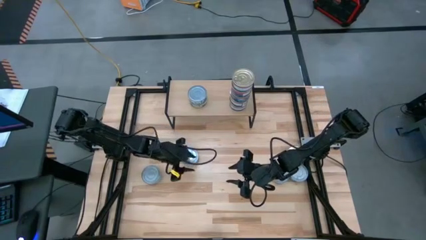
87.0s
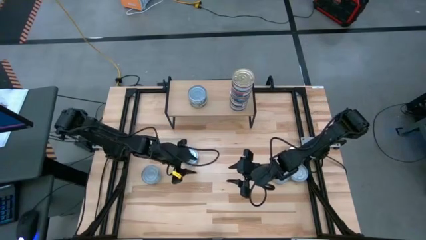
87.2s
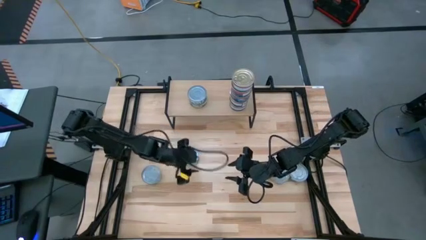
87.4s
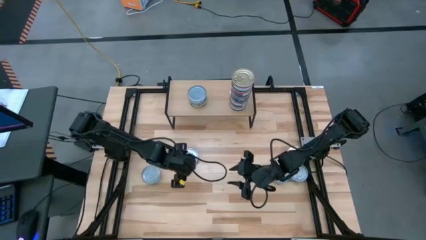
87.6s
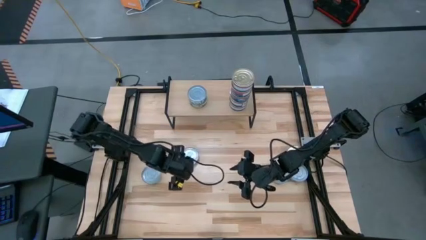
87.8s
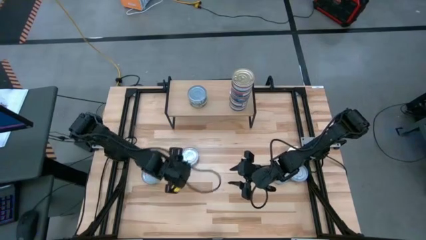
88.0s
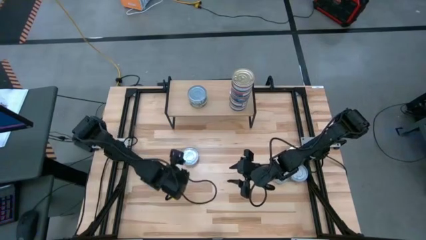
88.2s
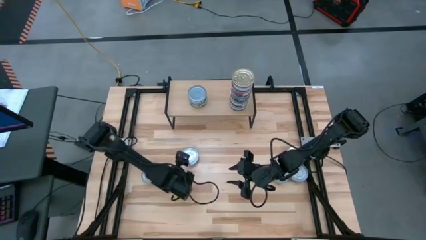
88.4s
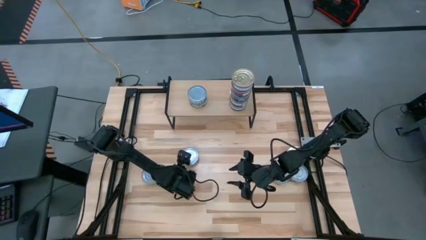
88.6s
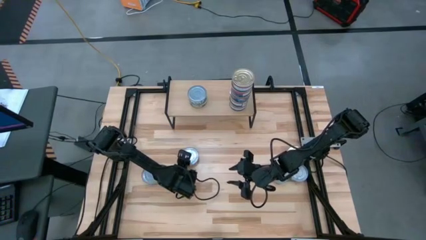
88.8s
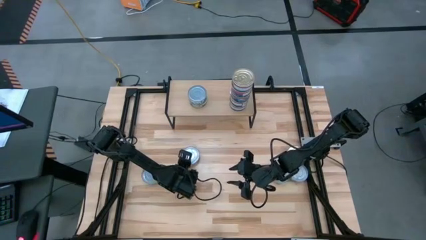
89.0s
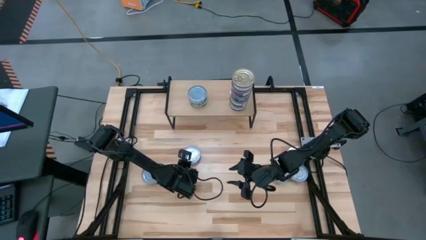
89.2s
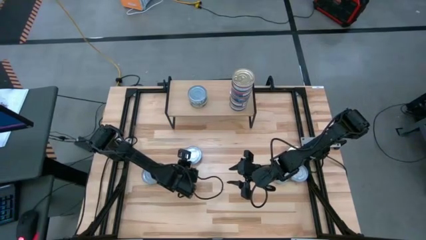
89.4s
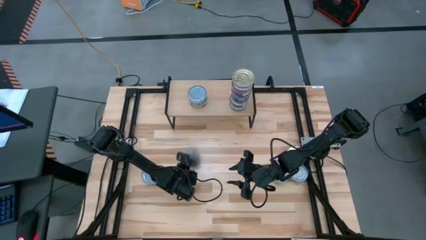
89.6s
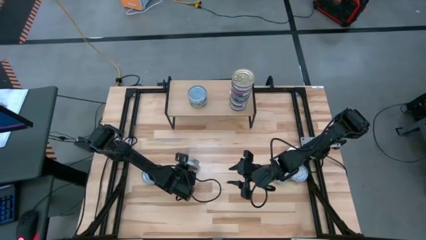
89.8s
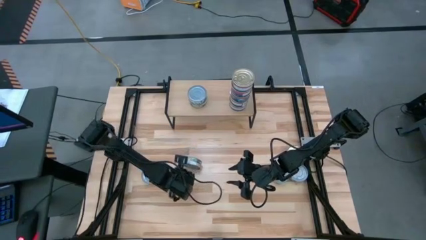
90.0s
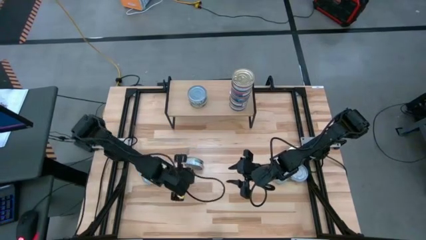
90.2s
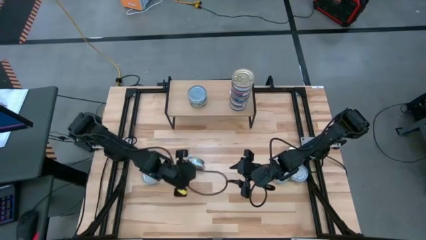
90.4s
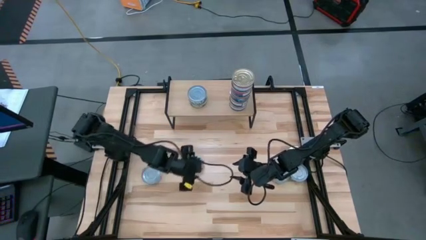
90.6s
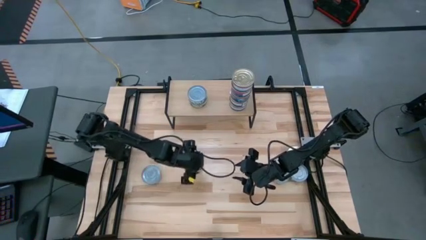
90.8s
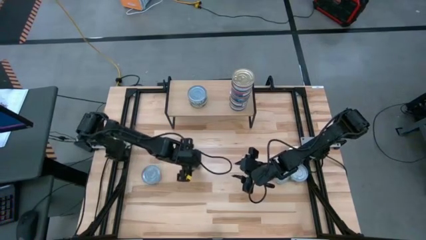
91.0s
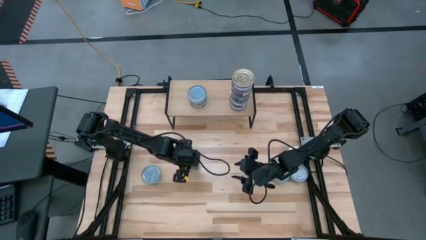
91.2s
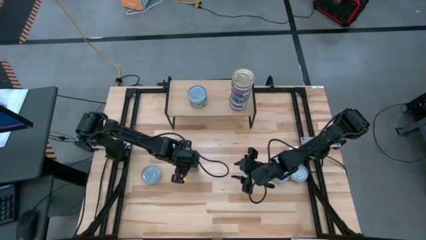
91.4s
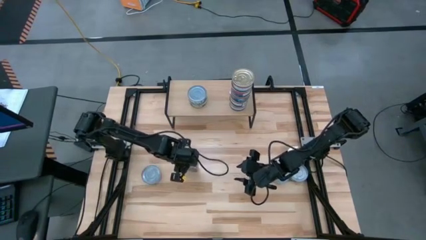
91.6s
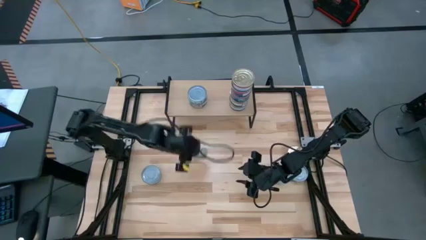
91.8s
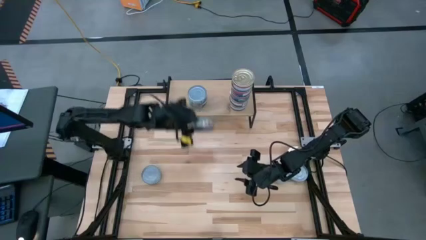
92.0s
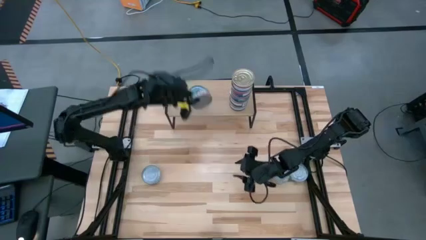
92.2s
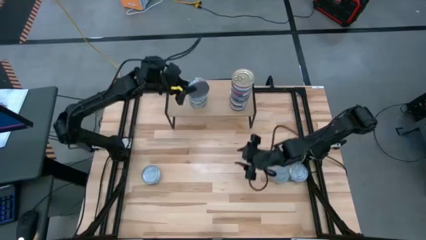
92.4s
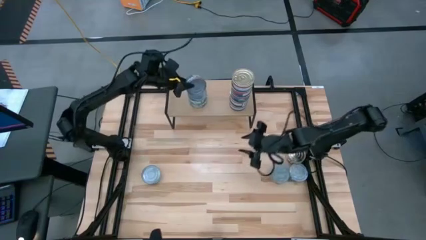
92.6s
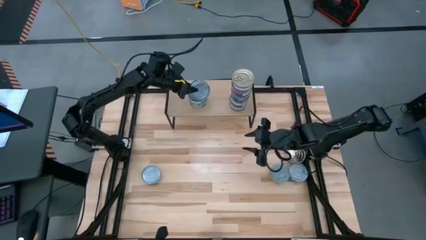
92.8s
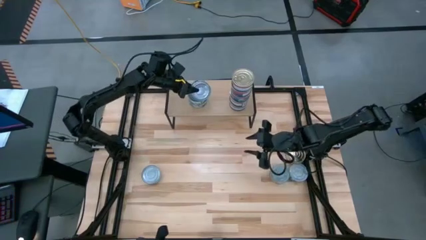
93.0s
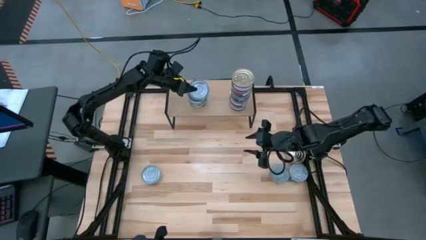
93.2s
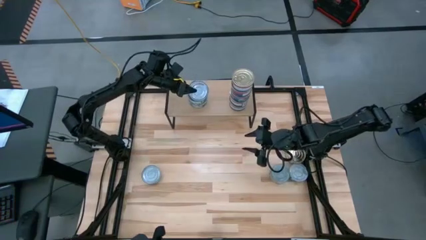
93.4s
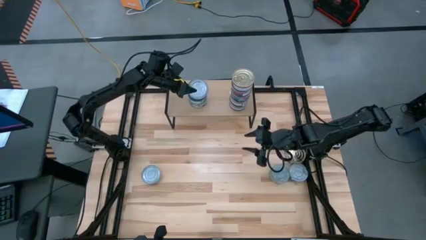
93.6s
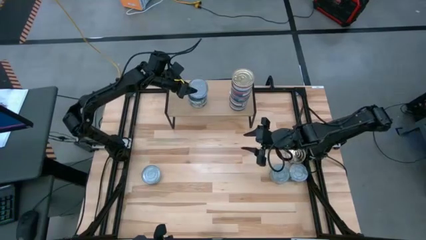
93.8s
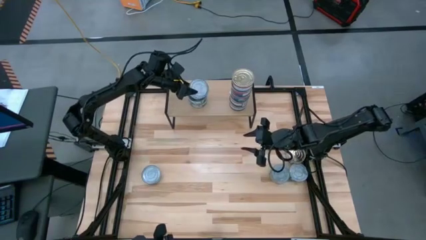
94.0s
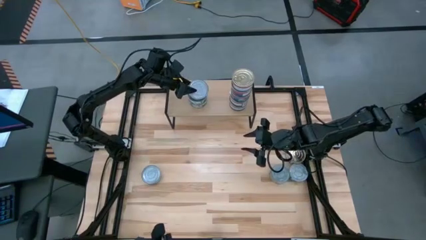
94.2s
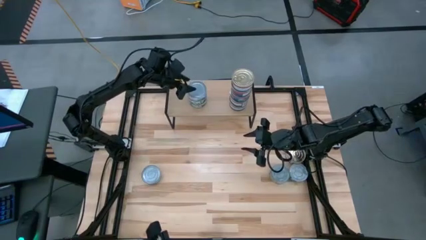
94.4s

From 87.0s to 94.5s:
Task: Stack canned seafood by type on shelf
Stack the green tuna can on top of the green tuna can on the shelf

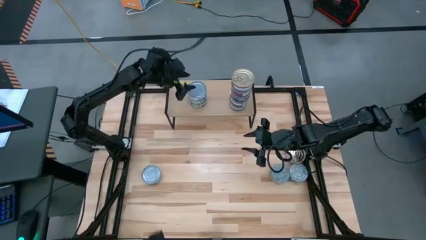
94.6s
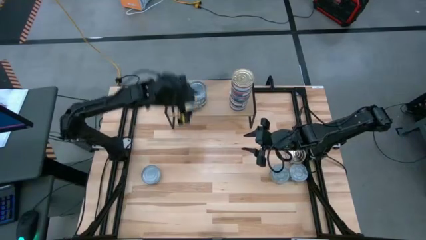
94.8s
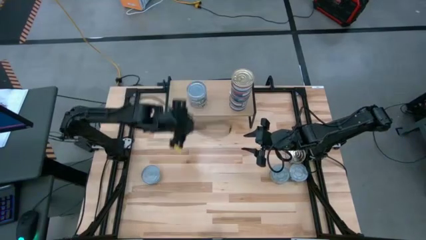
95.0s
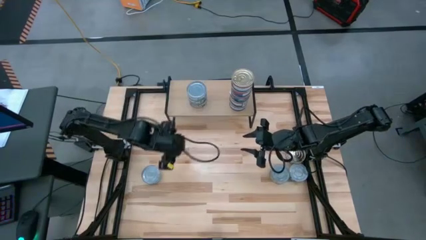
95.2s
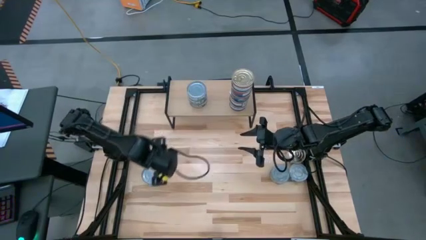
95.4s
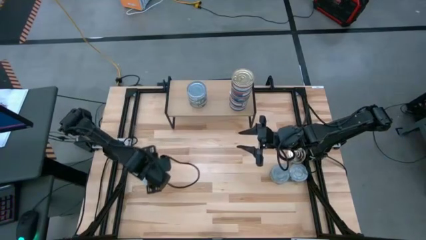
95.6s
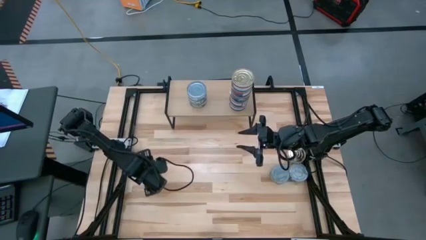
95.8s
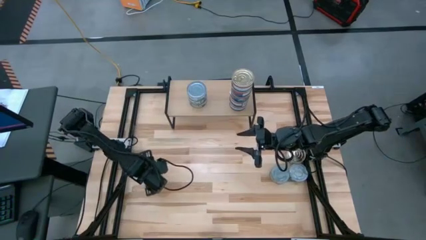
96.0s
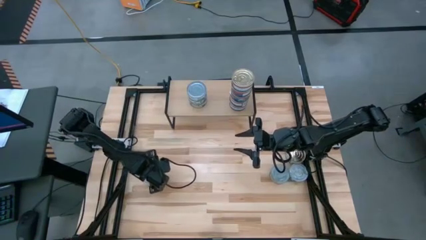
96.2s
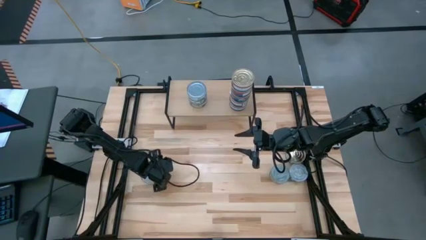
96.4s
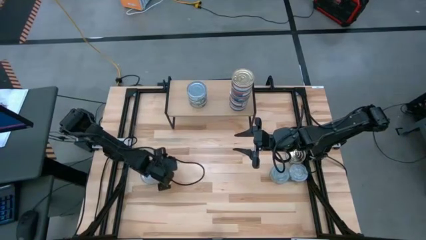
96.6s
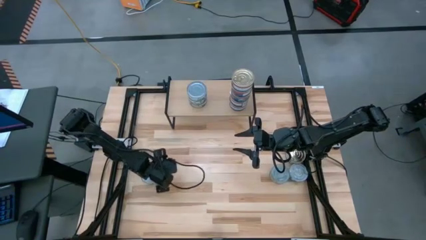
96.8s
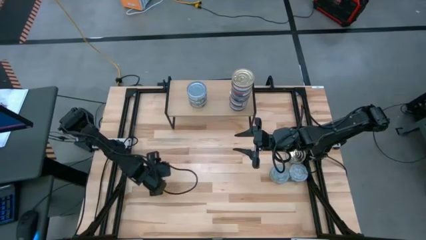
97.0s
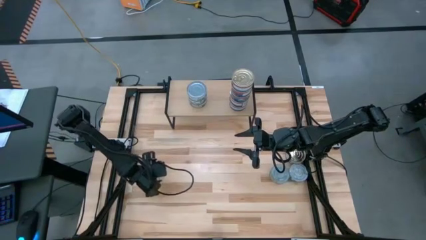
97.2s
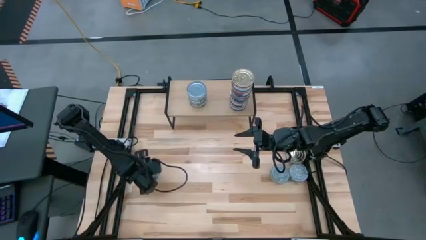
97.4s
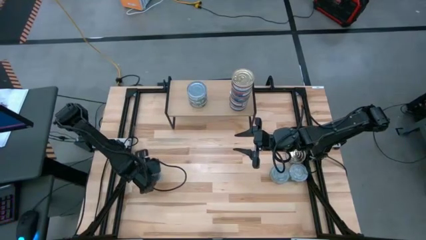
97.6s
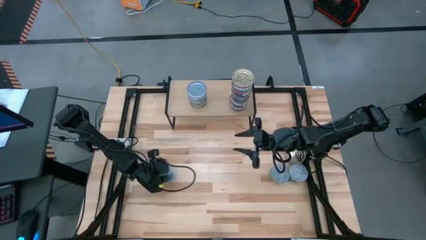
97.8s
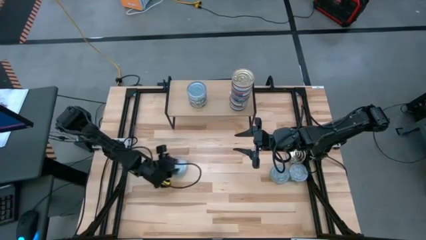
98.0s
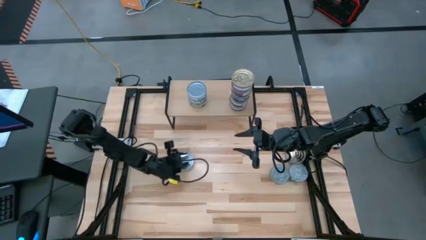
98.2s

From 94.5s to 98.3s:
Move the green tuna can to the center of the table

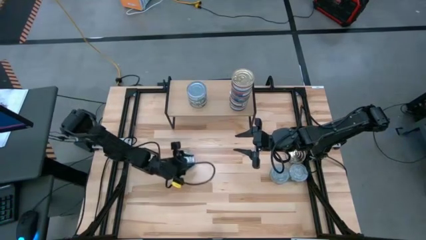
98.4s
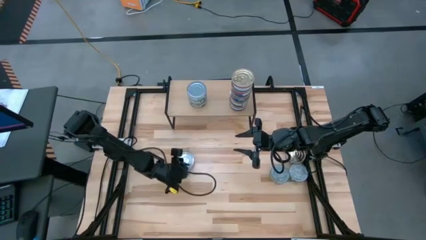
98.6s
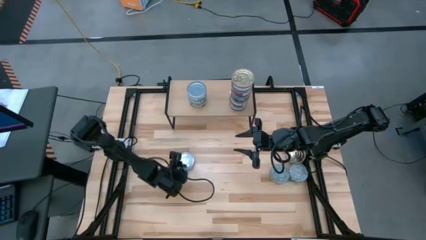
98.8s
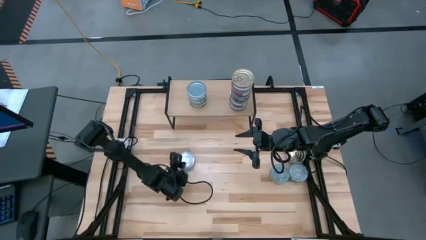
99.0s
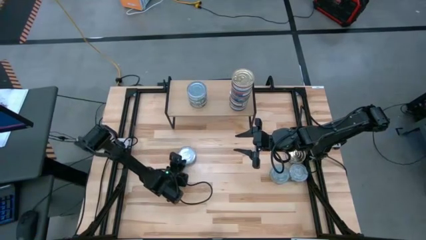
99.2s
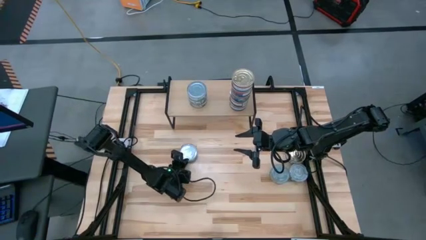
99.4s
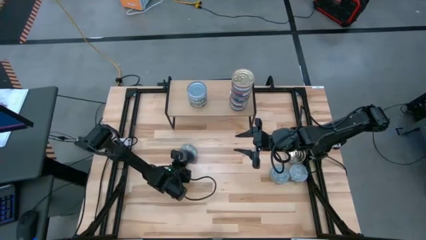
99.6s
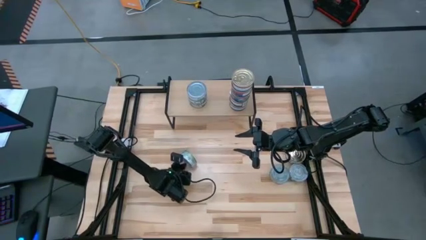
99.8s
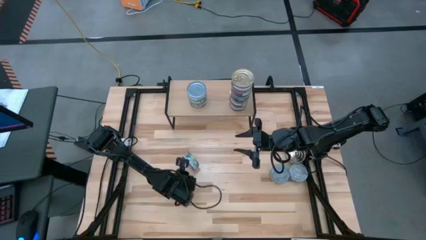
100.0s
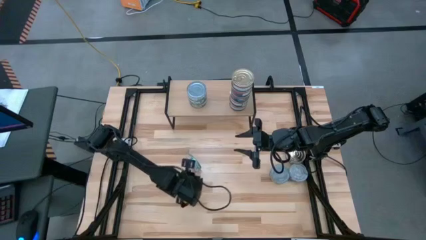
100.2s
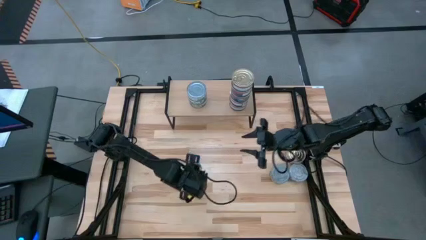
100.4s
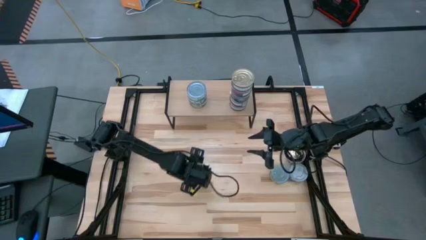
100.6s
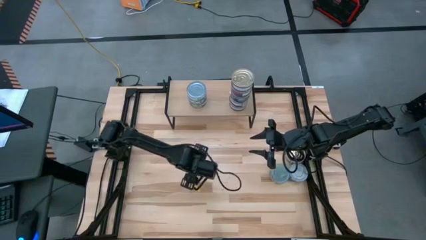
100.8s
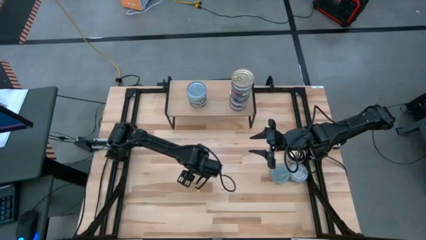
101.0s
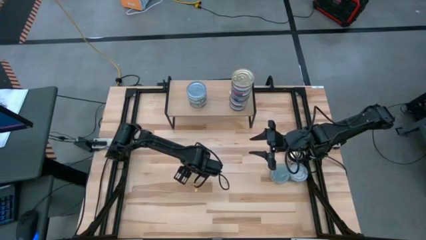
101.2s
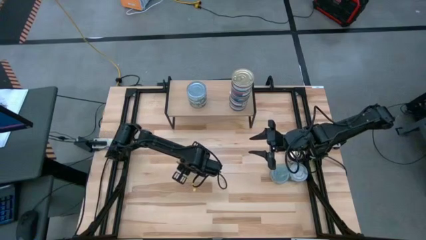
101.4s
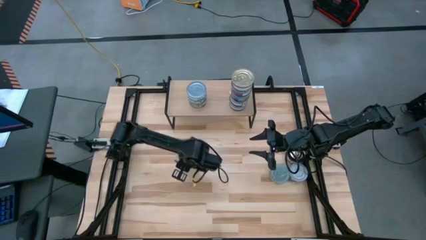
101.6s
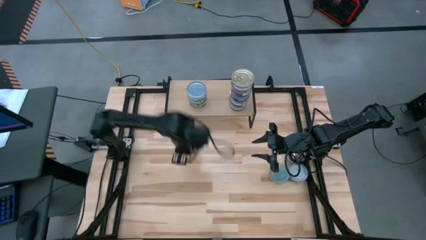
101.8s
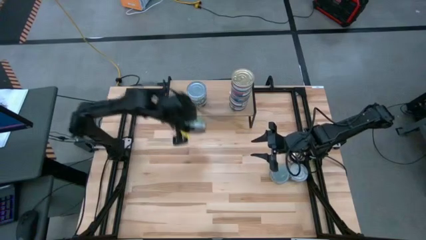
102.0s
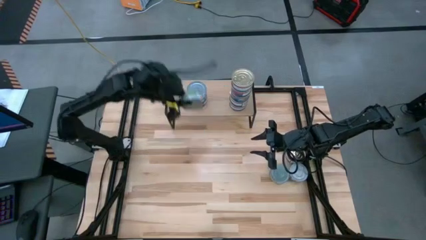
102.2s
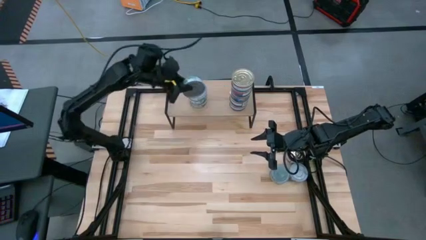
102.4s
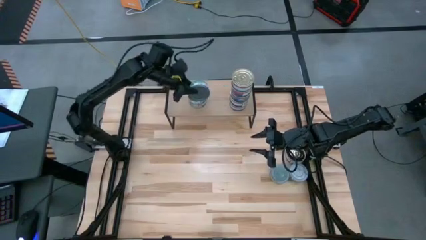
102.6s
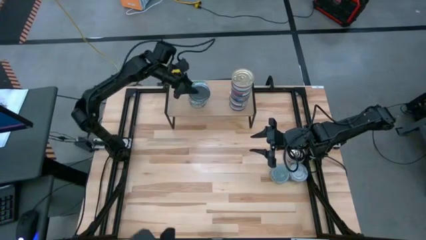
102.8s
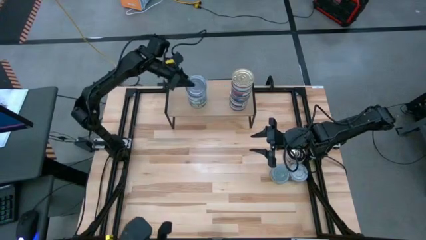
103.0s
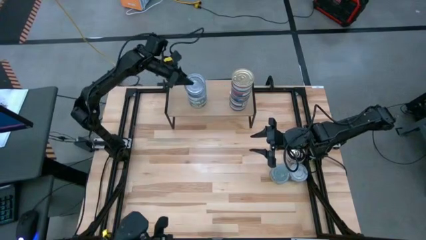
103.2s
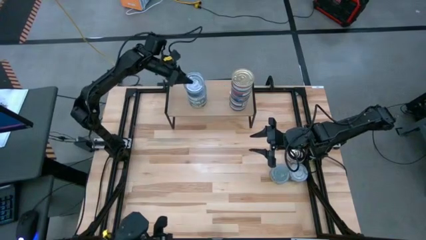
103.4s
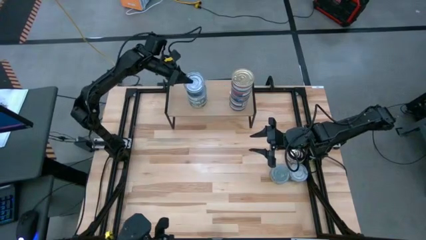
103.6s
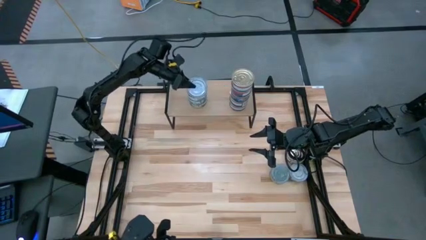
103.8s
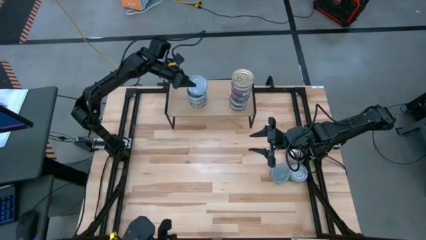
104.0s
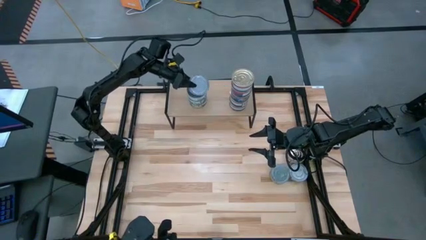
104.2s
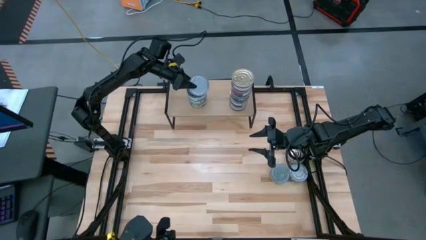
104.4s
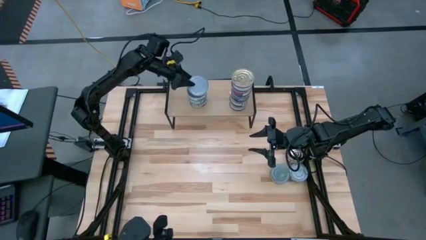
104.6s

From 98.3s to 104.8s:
Stack the green tuna can on top of the green tuna can on the shelf
